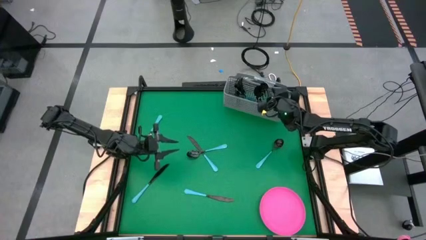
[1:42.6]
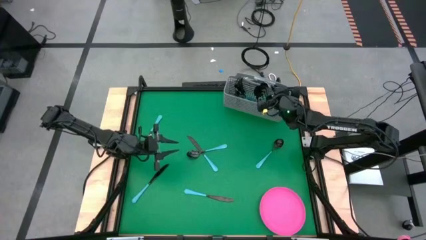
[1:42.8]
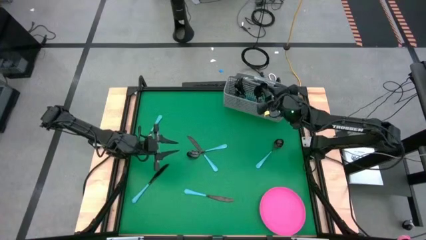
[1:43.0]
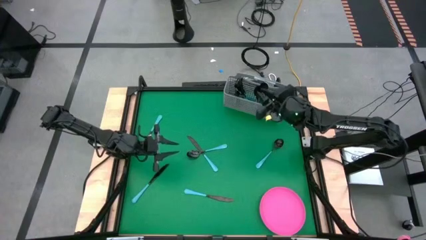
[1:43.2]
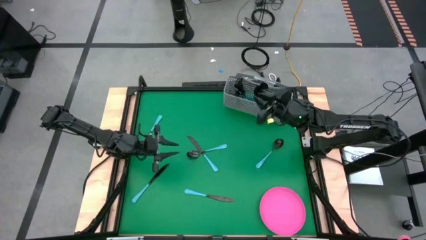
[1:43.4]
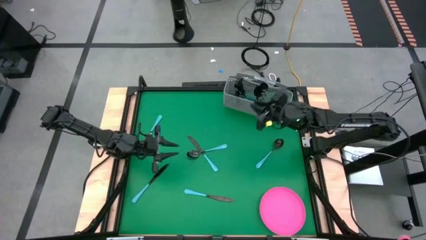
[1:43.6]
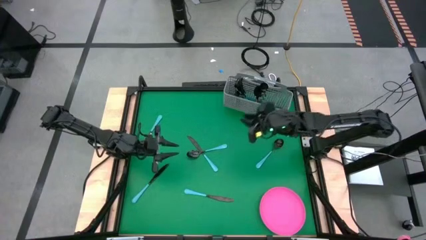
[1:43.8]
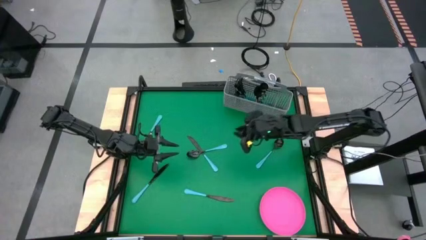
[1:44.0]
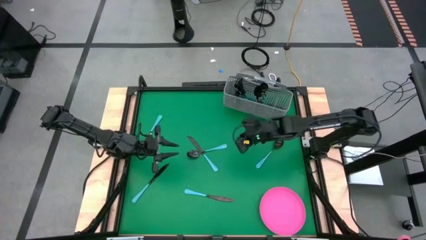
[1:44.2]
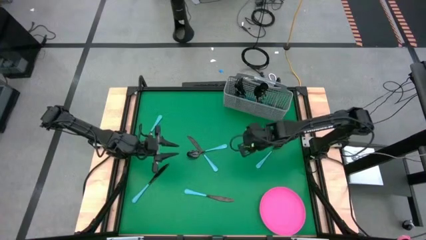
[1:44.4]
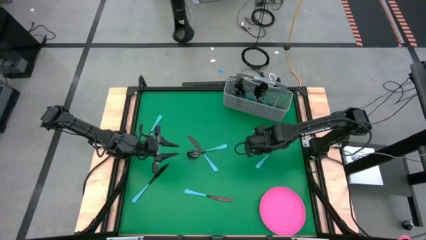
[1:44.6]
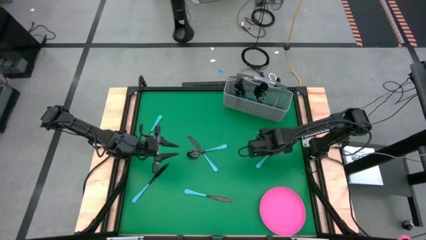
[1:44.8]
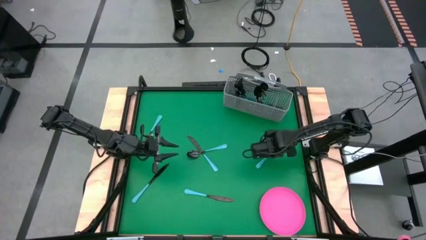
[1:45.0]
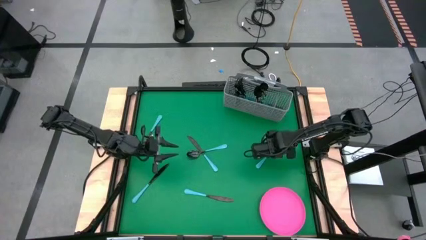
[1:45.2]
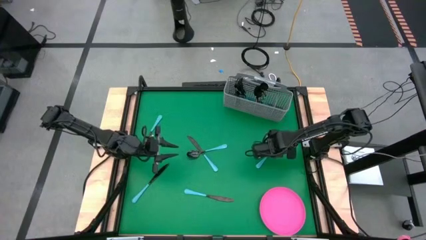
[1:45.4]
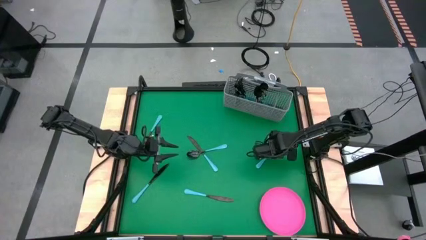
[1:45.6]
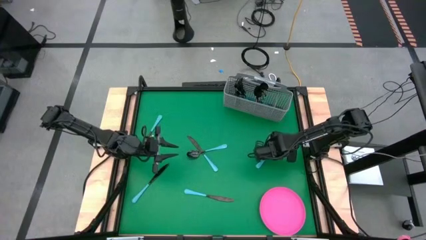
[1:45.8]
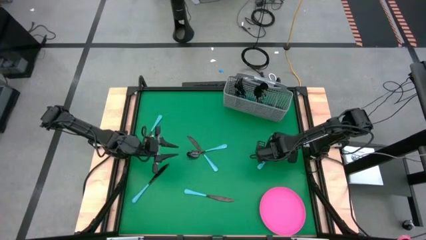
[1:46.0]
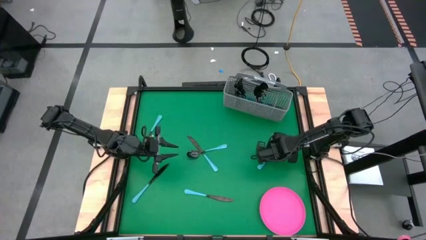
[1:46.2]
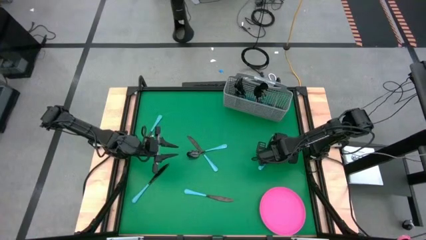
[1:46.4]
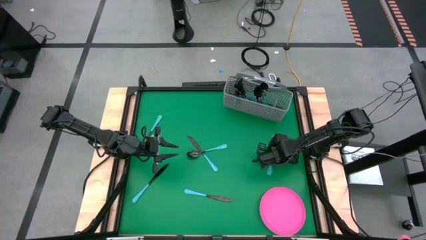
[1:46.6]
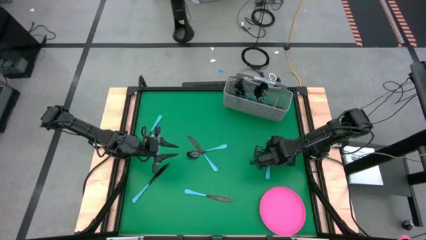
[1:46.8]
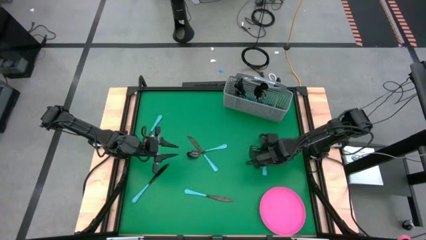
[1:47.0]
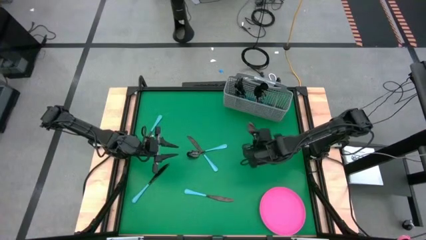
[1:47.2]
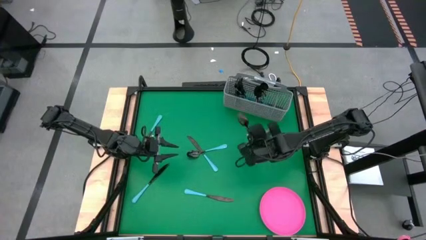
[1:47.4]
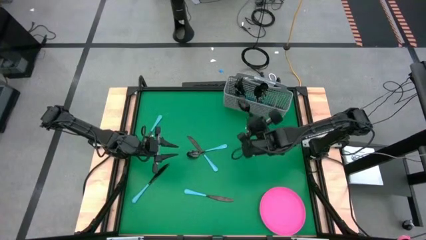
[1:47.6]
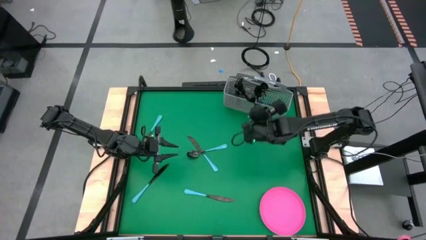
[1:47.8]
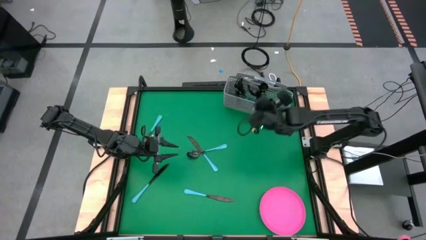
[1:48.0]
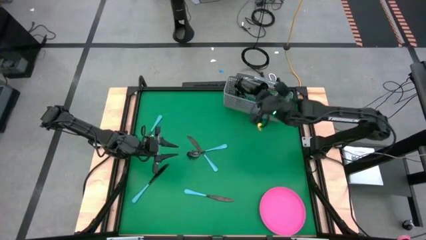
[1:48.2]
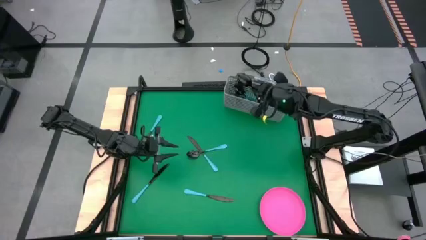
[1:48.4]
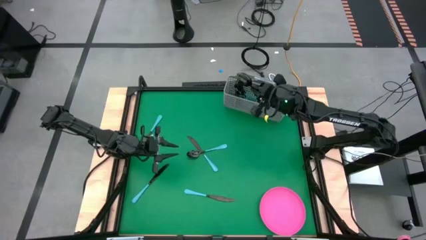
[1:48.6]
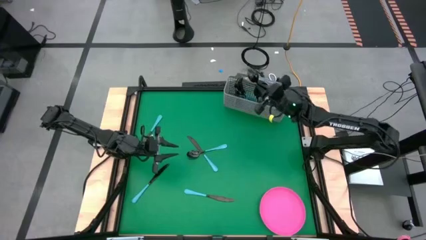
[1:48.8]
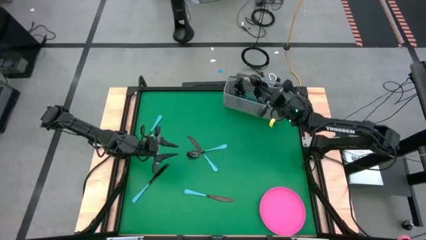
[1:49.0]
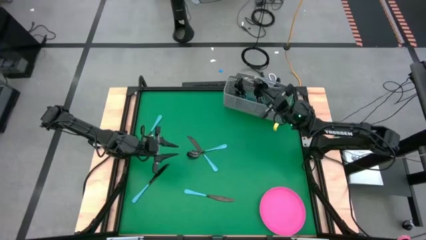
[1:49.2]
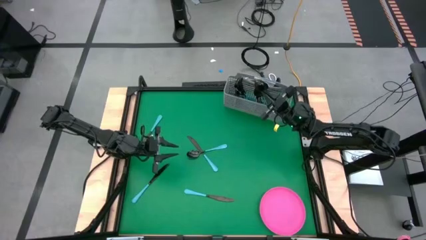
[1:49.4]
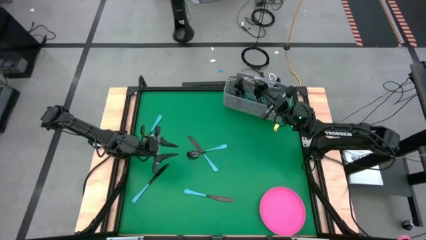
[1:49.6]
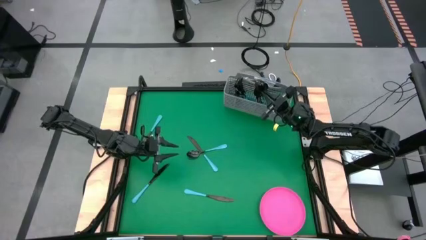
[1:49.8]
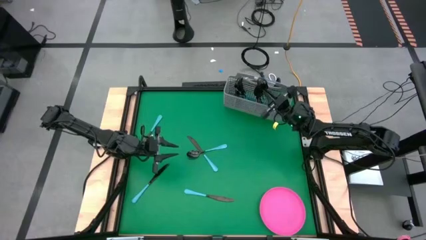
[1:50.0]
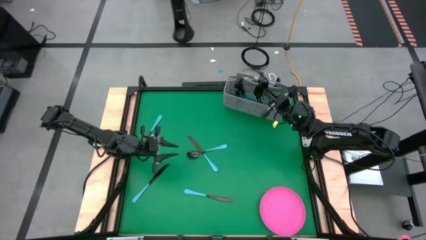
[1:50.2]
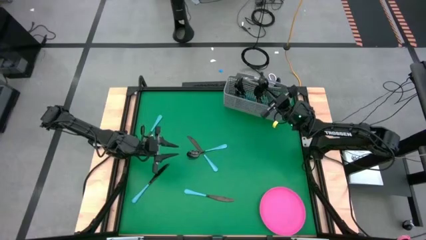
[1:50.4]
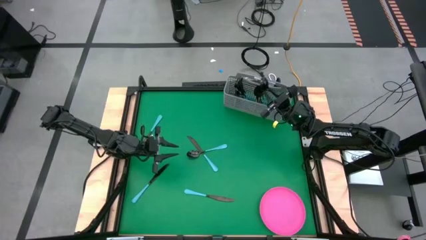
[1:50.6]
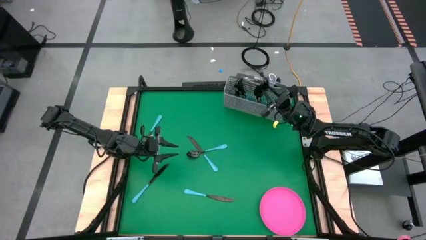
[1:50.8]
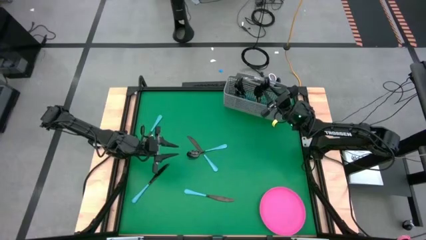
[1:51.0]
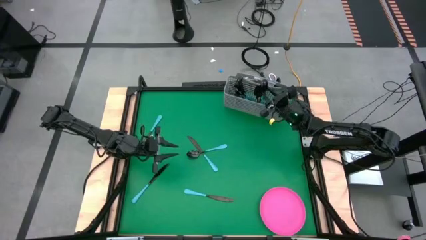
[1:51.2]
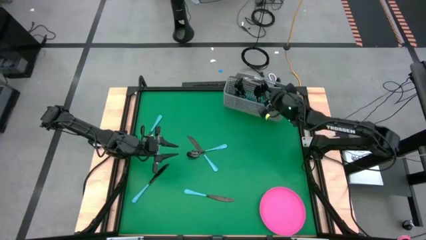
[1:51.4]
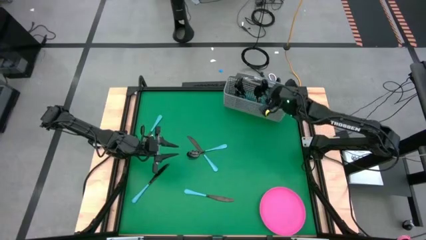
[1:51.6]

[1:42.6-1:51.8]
Task: Sort silverware
Put the blue spoon into the silverware basket

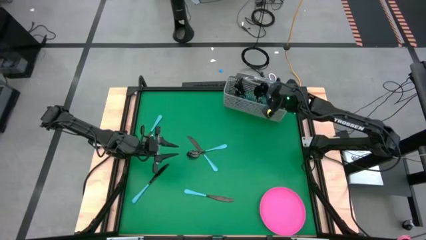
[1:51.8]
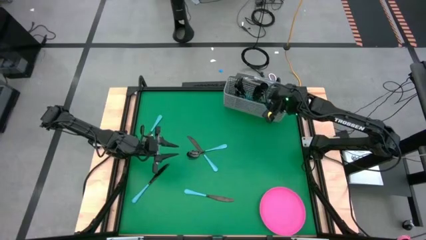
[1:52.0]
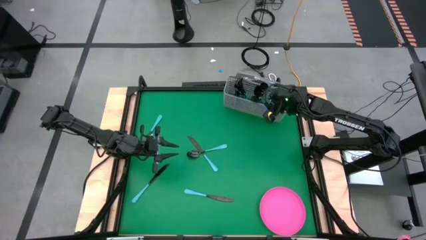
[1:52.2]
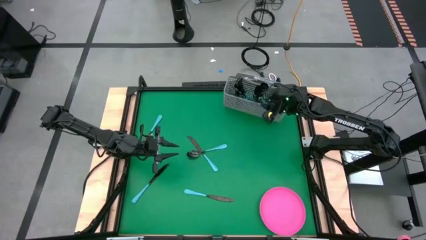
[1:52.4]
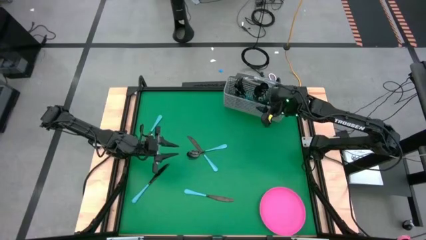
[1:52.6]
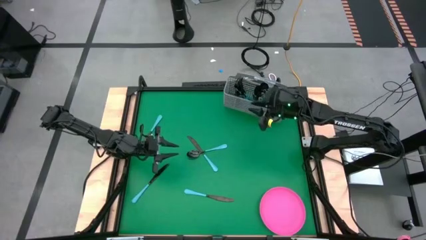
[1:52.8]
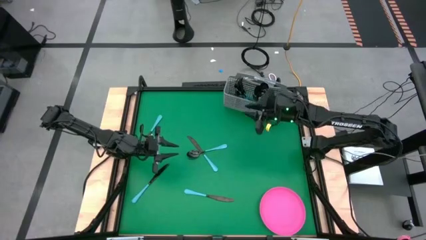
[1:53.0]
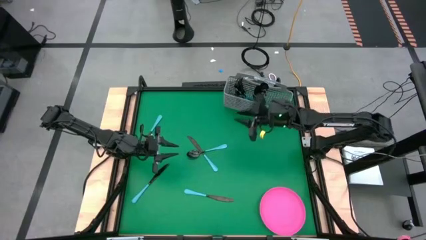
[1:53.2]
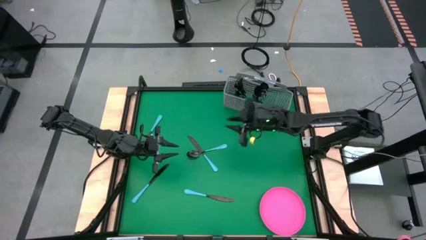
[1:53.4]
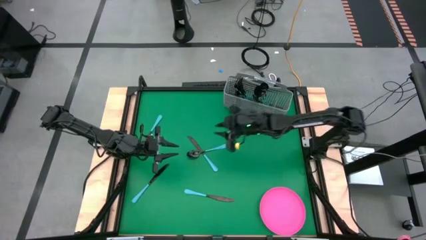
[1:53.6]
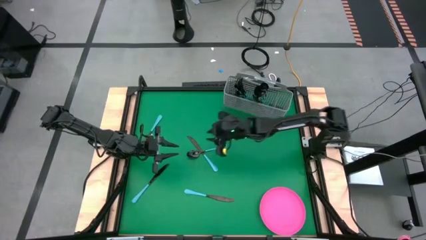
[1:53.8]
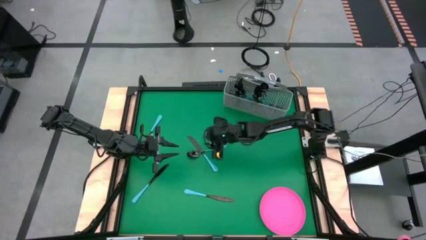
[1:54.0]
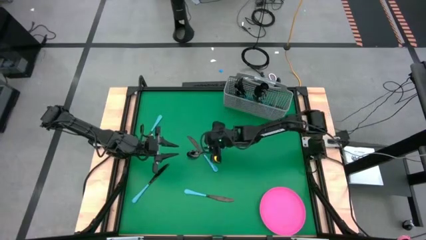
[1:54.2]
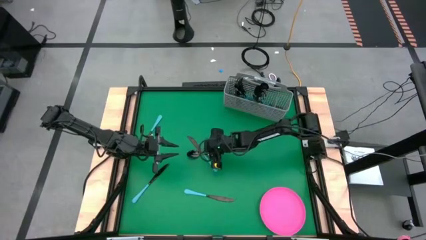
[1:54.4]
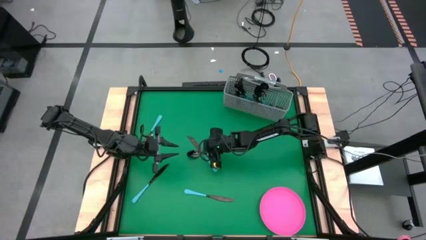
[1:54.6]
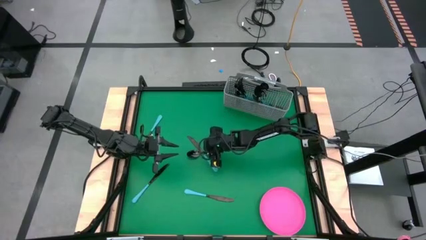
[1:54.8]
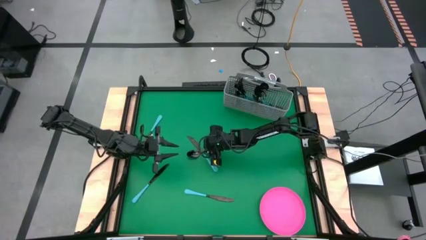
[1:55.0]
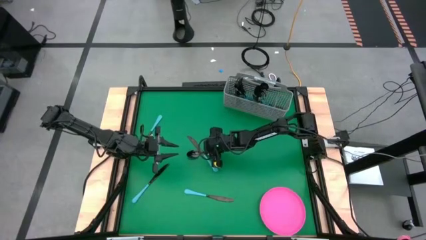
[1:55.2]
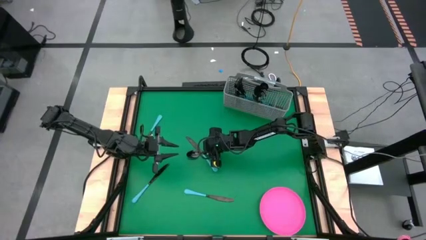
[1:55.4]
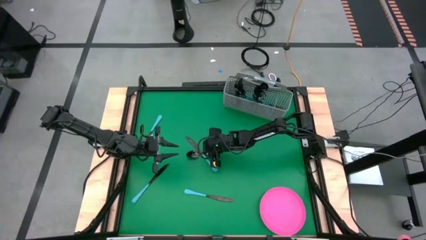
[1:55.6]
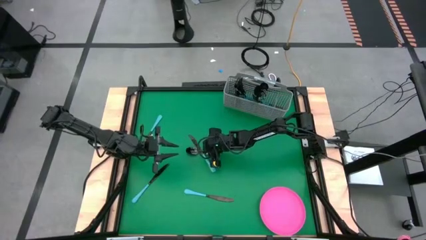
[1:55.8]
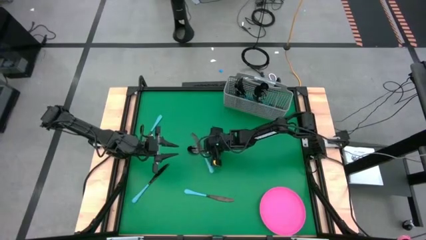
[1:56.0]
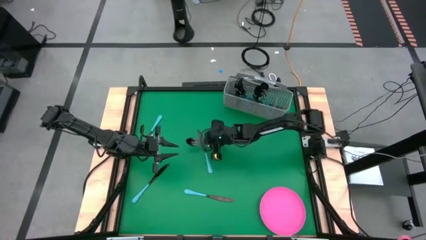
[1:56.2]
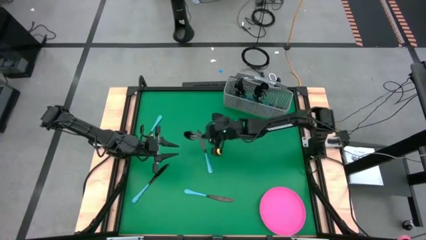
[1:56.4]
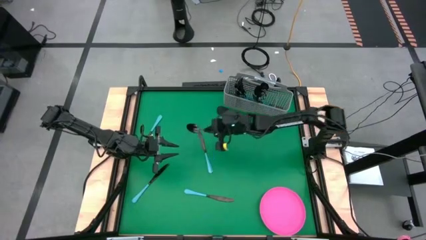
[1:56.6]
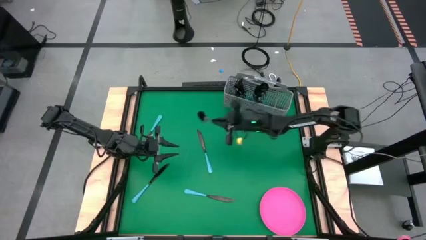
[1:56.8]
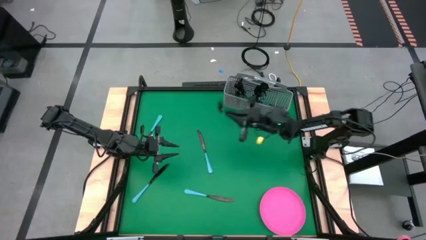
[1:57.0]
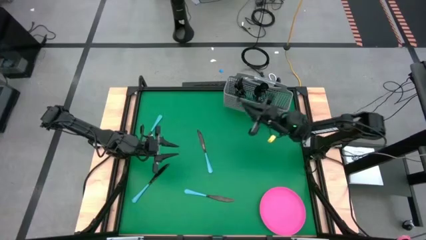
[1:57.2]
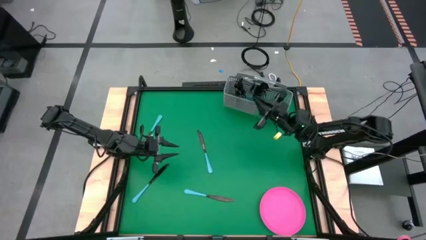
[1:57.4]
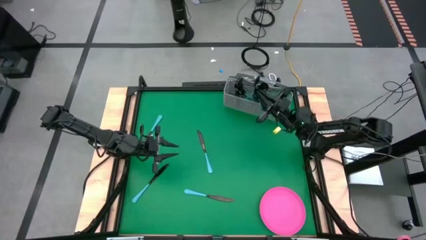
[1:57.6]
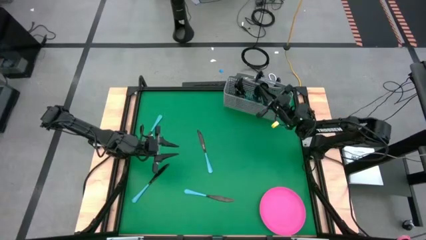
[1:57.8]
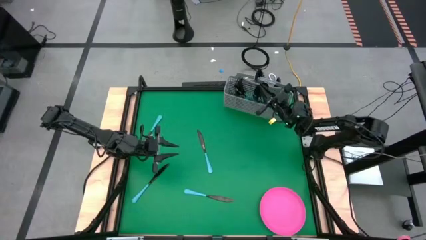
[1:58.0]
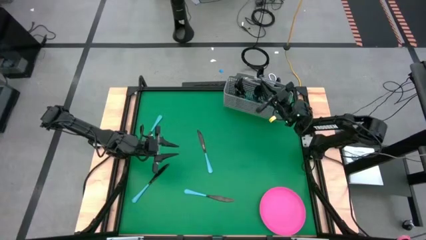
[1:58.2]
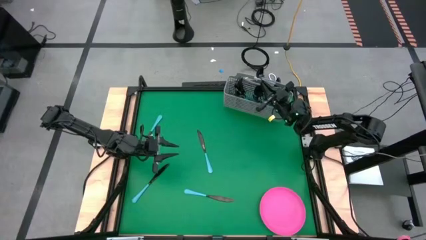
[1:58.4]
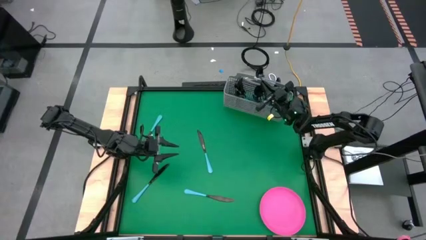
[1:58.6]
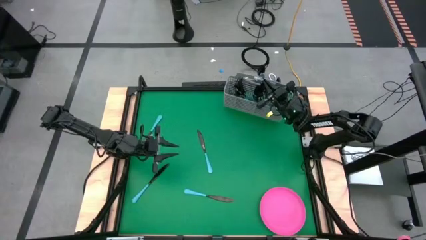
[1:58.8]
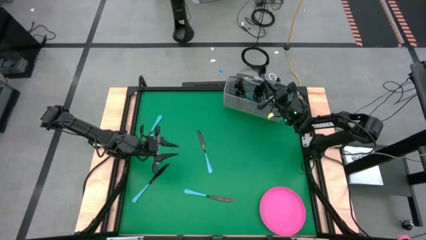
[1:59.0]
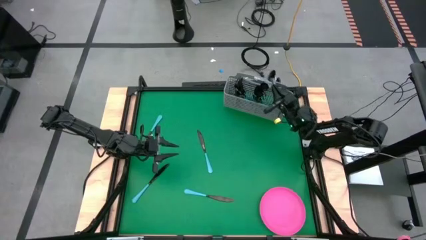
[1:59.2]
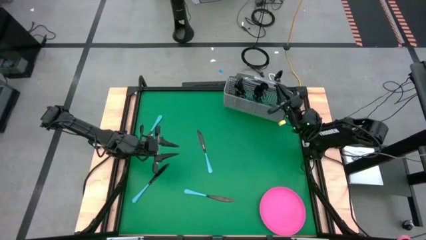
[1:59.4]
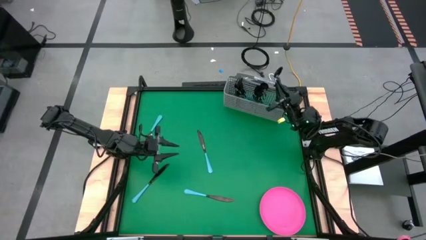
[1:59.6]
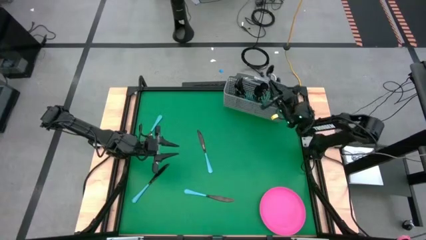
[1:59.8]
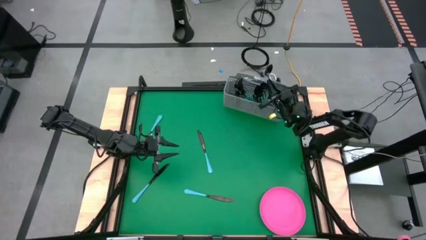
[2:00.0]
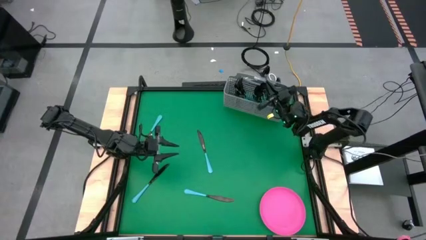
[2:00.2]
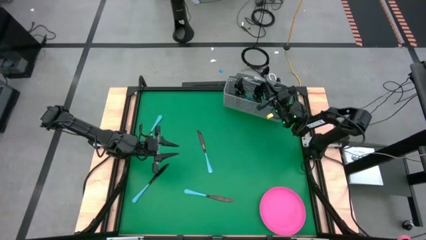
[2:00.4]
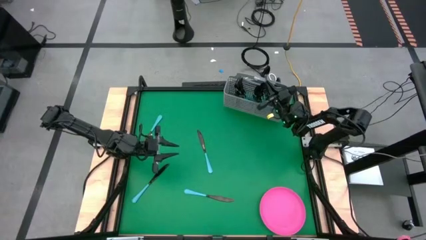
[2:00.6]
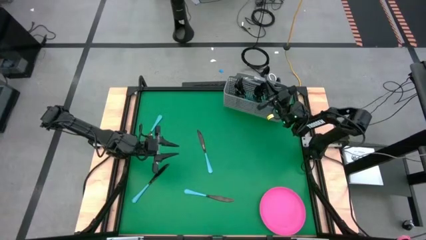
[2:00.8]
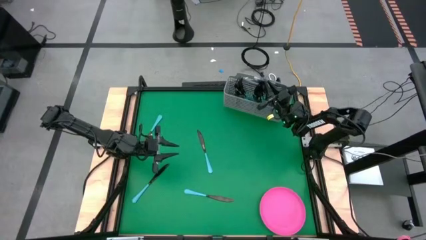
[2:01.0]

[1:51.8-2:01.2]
Put the blue spoon into the silverware basket
